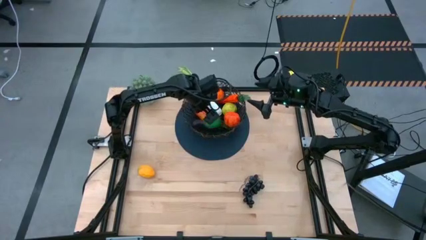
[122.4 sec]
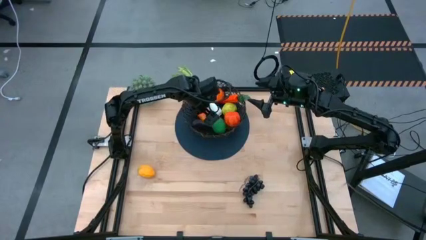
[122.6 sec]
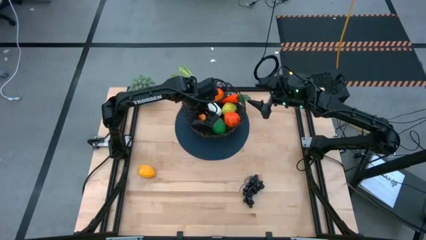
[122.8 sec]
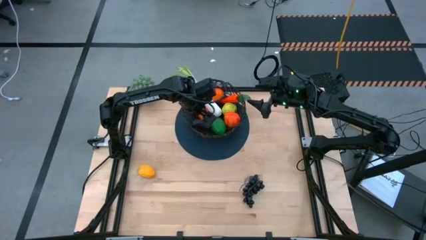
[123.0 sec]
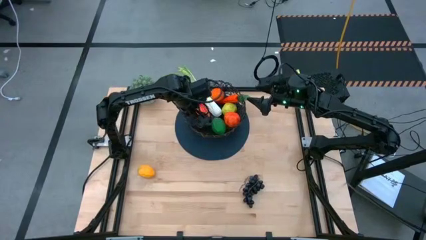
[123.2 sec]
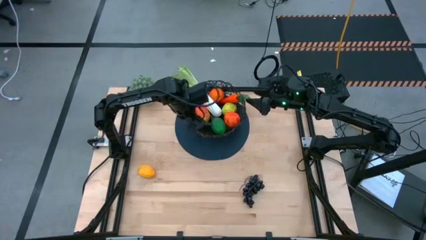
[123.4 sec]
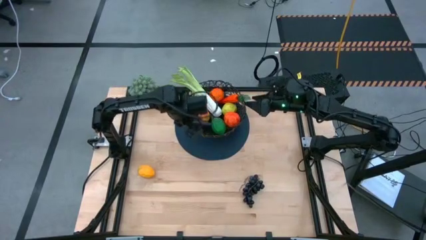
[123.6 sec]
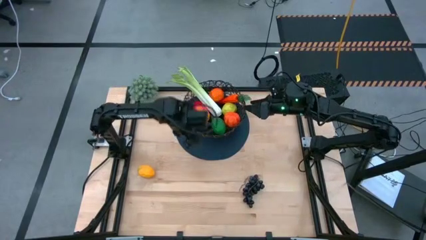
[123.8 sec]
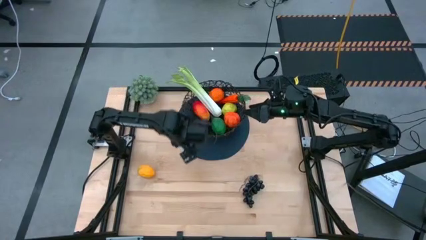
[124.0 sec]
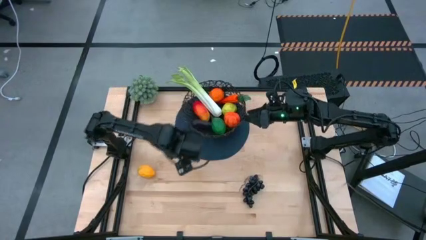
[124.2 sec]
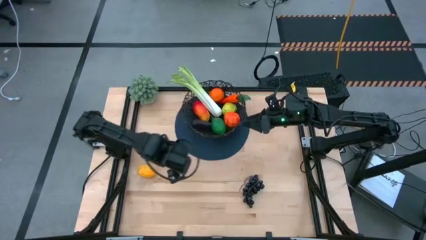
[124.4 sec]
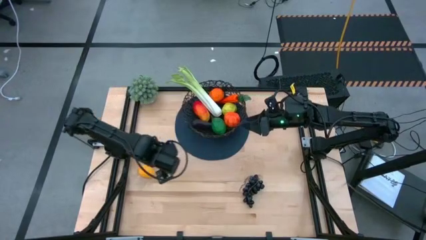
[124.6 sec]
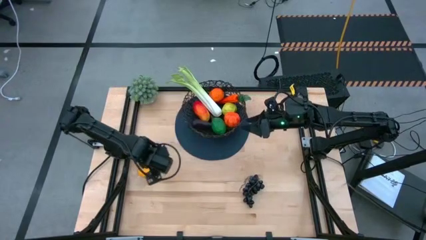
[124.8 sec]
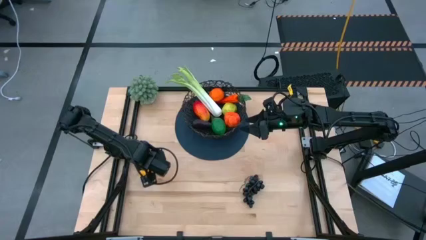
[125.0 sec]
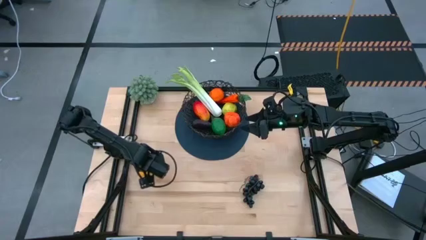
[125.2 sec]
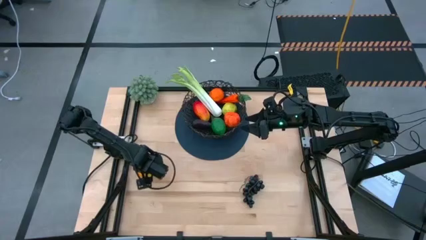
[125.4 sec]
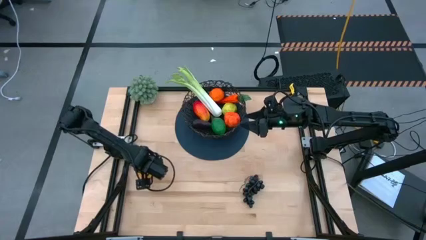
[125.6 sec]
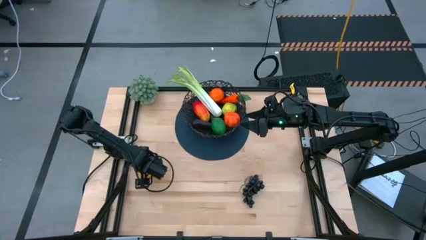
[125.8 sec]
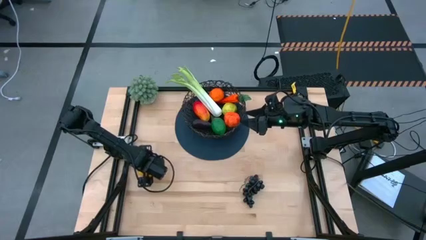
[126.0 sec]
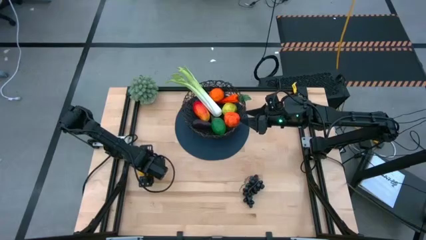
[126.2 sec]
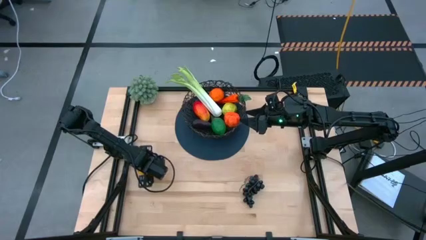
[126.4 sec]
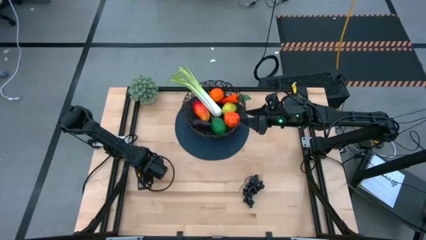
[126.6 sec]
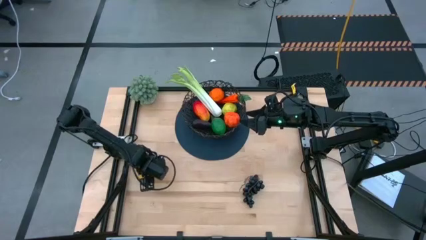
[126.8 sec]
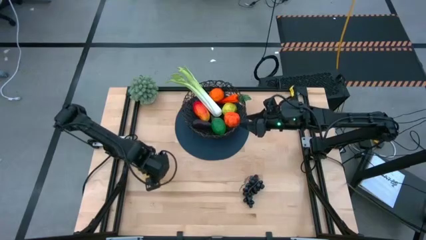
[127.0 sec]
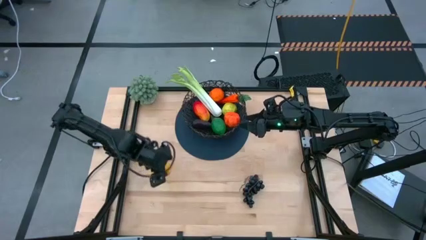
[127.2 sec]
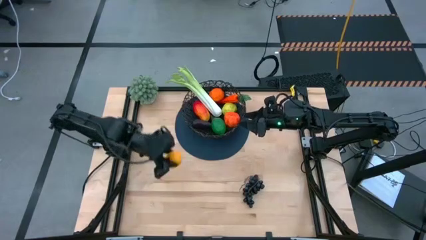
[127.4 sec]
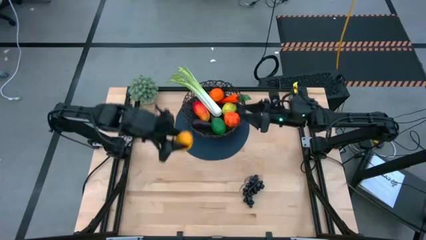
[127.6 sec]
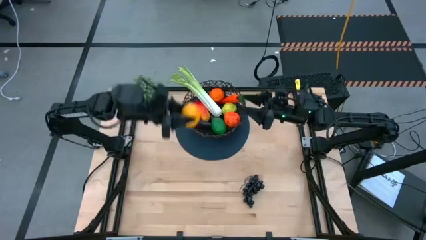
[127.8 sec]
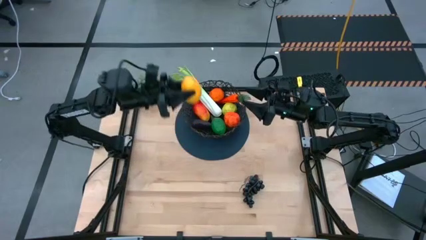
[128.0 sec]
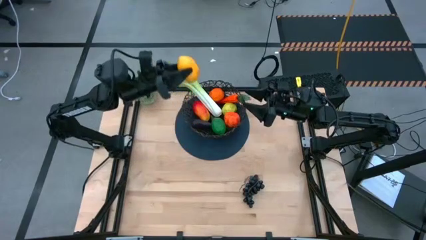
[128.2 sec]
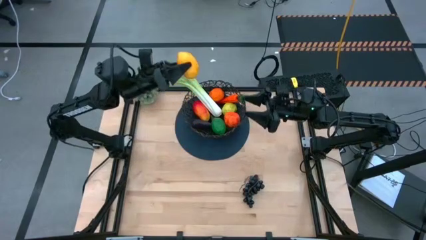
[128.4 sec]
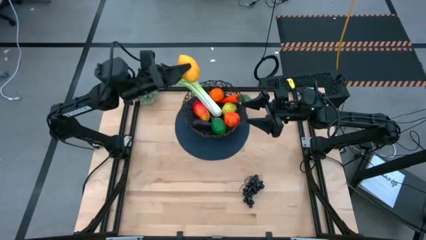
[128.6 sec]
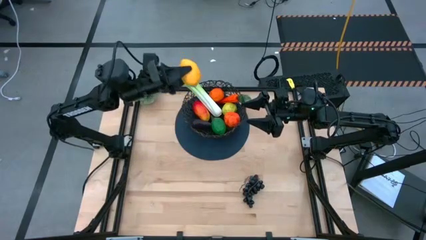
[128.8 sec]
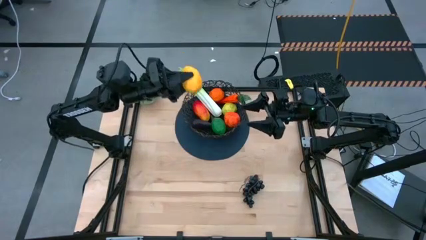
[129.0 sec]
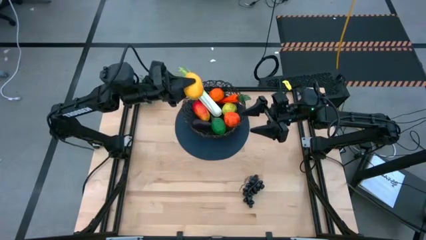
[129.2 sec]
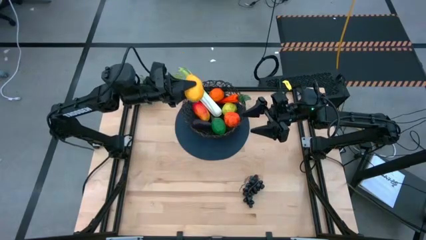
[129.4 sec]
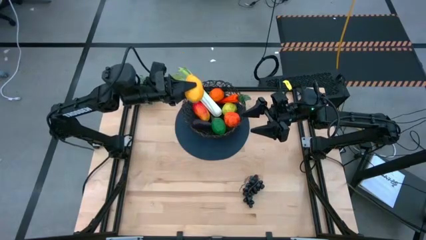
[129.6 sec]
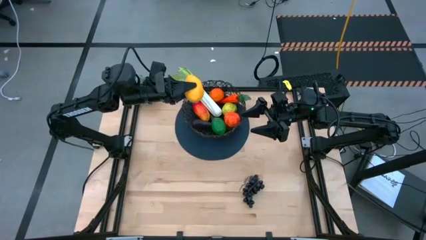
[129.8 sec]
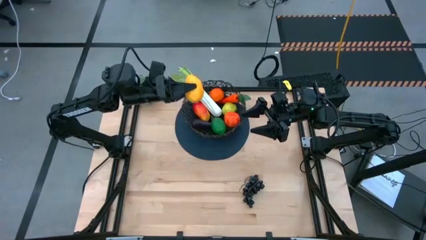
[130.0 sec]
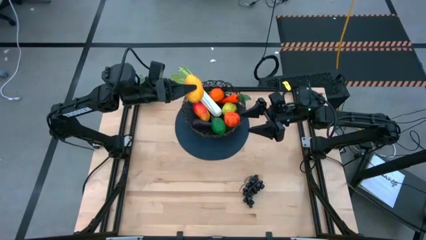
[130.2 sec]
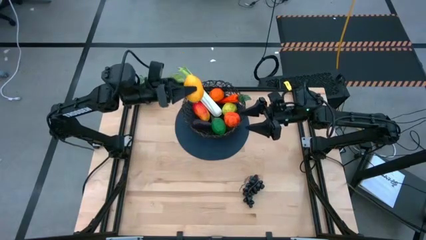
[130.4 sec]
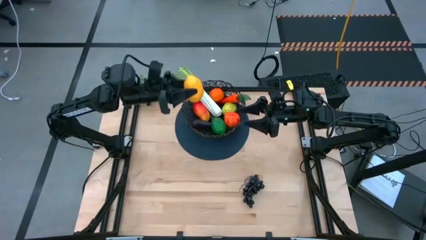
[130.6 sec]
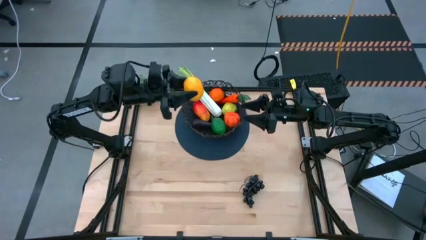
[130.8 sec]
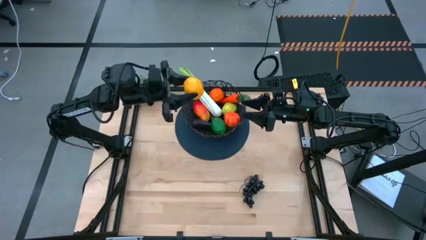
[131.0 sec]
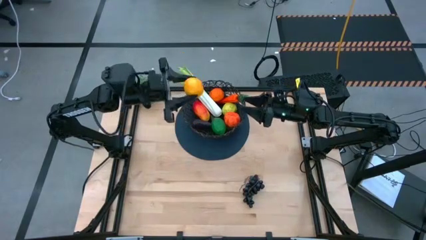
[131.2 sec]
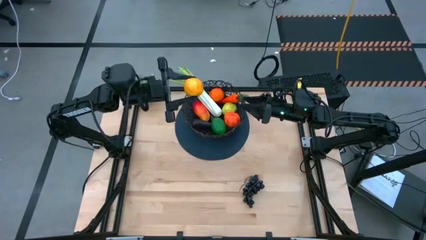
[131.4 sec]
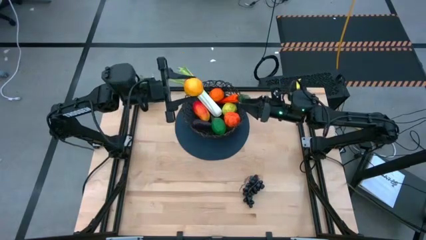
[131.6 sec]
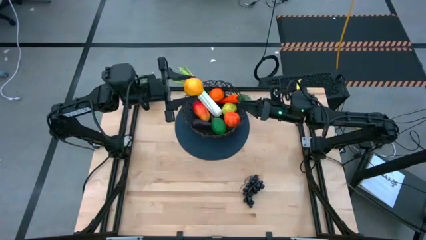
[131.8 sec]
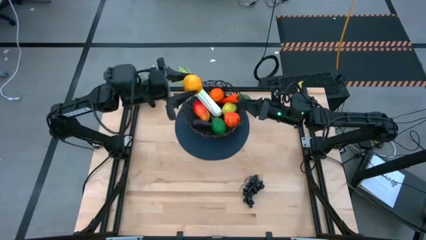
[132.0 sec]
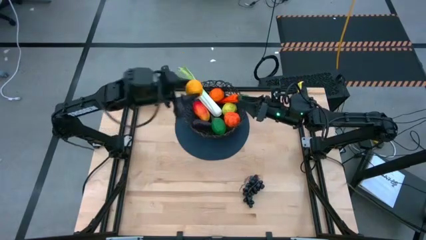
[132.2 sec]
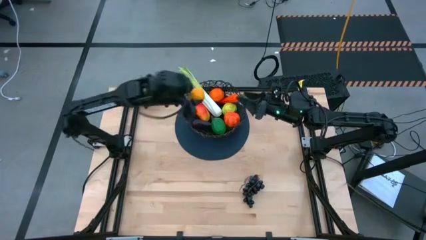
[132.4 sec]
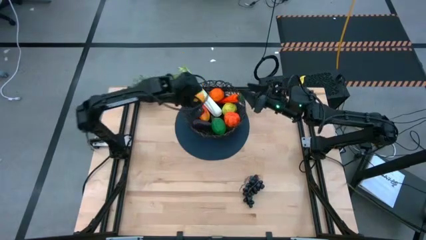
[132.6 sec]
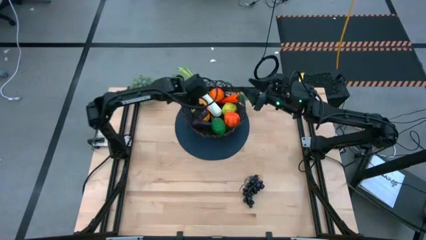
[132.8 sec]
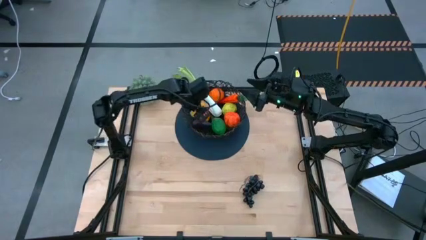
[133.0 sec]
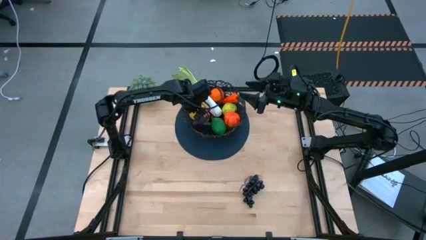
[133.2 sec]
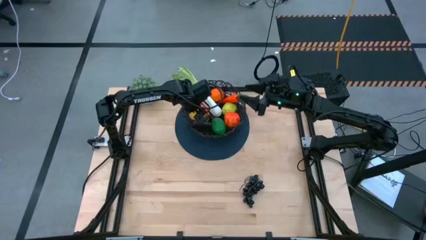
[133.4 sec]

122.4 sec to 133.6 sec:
Task: Build produce basket
Put the yellow lemon into the wire basket

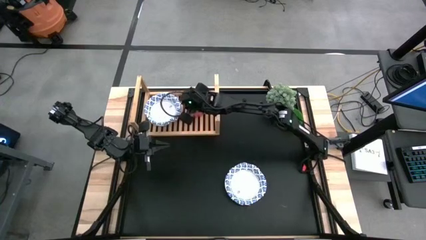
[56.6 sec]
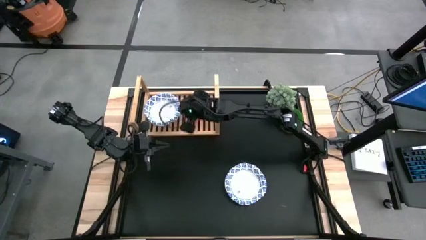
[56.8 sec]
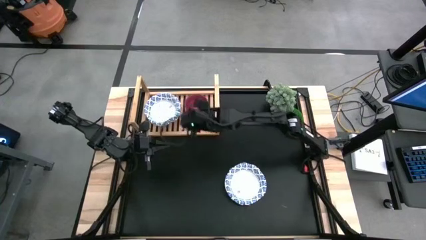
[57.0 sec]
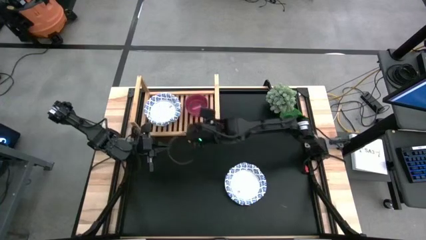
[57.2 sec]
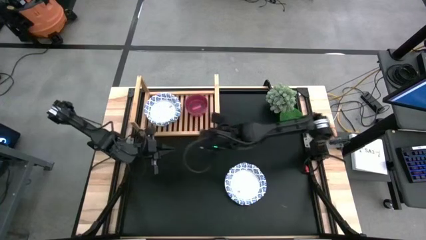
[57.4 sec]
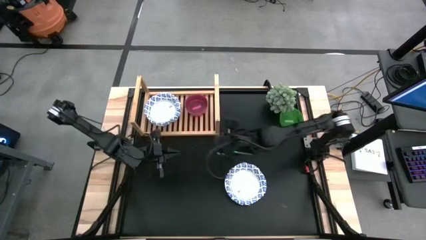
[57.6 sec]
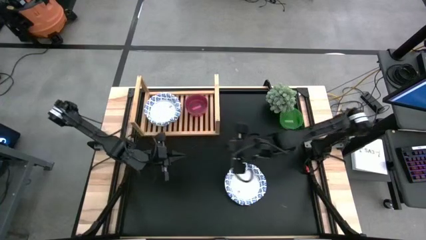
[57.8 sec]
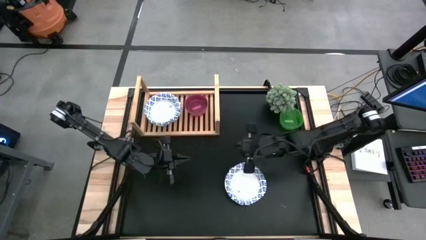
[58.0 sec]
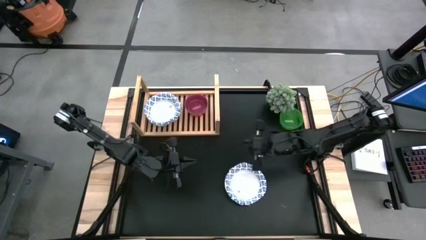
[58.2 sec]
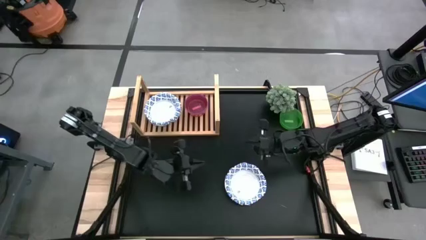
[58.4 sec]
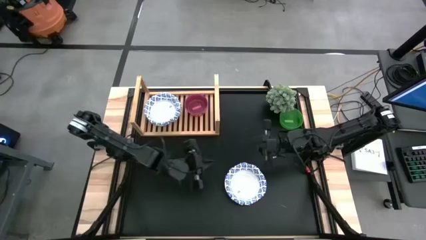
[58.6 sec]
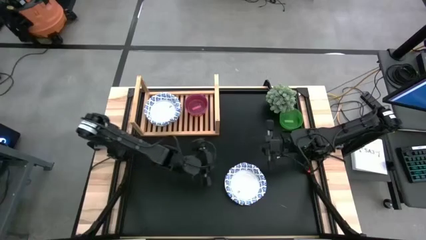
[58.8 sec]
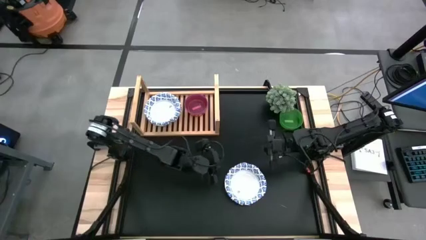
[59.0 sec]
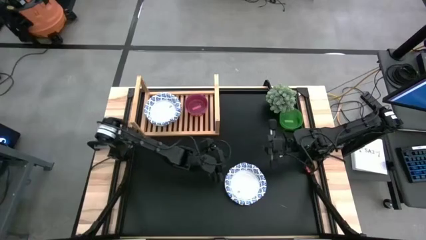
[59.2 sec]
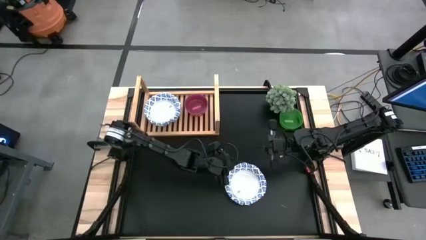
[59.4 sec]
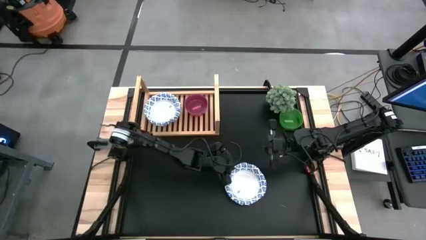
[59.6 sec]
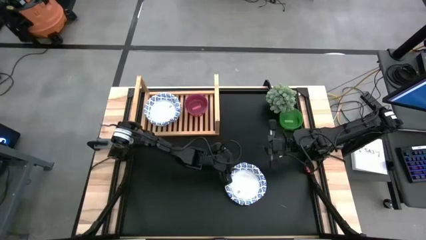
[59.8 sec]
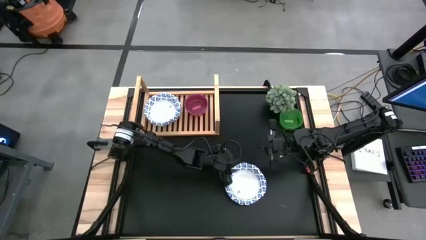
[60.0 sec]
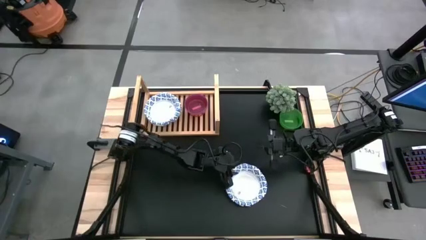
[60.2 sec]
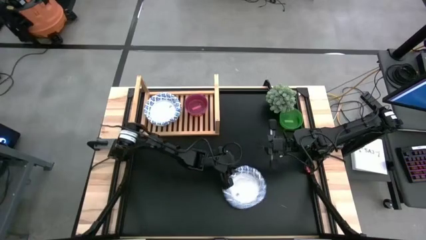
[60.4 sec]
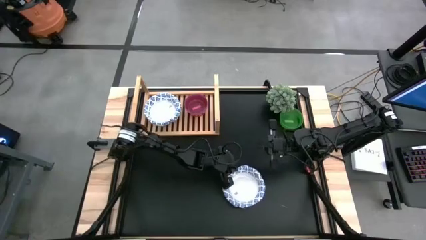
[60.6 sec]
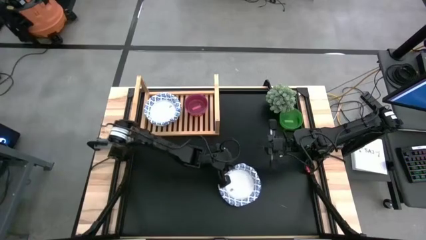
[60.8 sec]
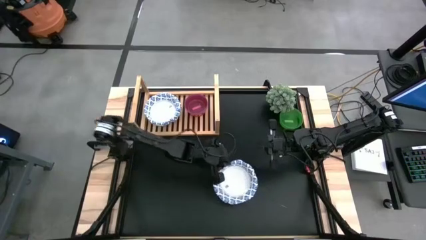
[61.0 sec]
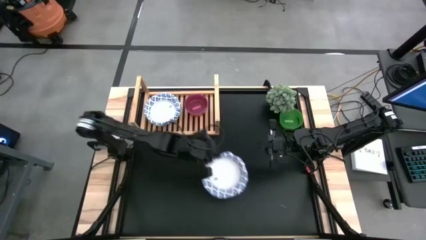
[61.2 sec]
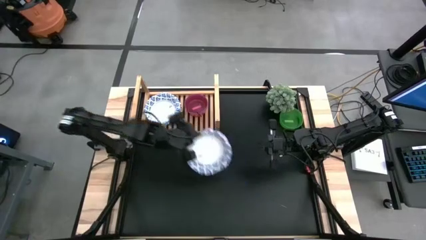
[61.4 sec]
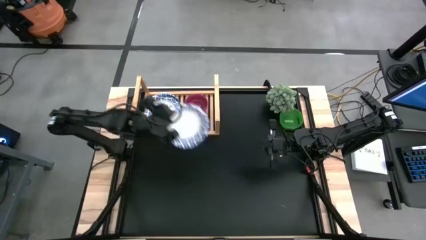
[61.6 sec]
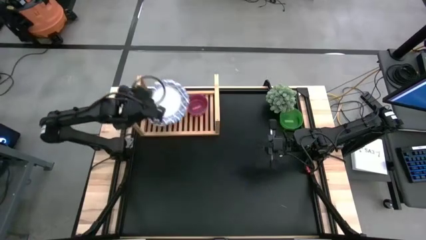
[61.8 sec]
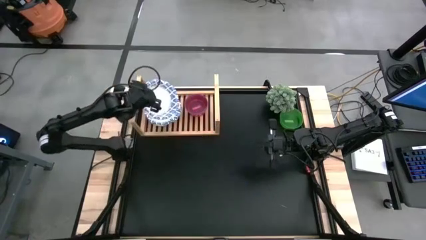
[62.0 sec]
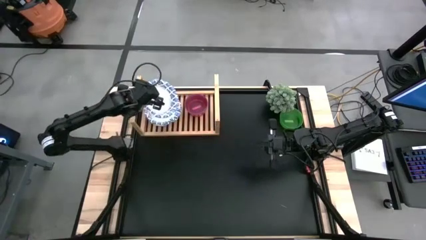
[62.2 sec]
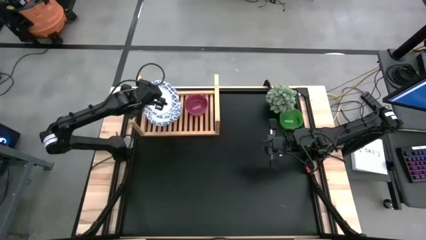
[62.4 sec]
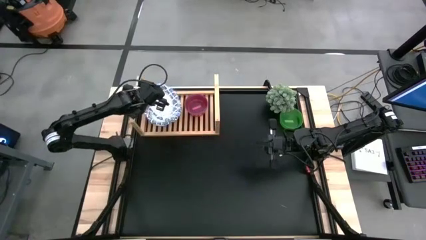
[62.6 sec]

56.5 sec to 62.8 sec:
Task: Place and stack plates onto a shelf
Stack the white and blue plate on top of the white and blue plate
